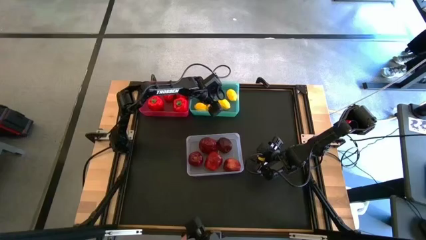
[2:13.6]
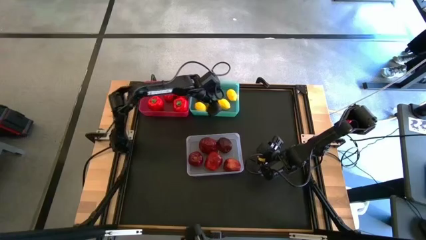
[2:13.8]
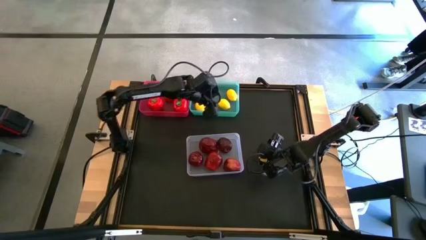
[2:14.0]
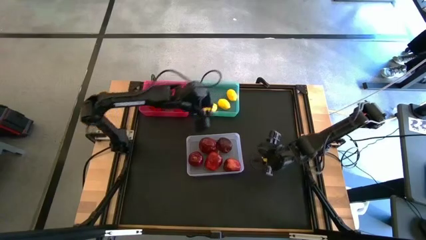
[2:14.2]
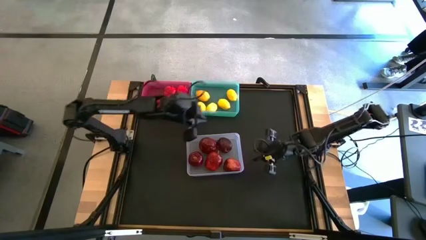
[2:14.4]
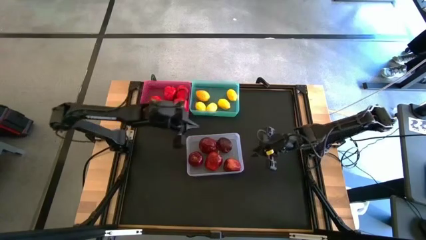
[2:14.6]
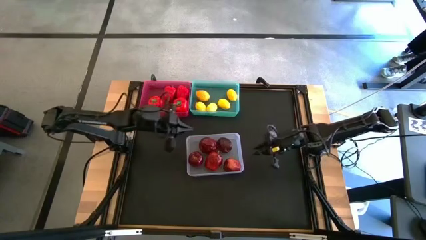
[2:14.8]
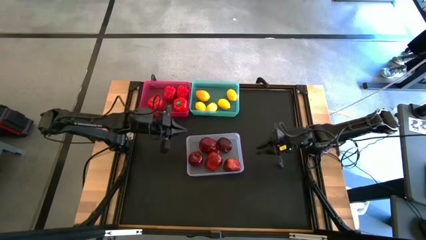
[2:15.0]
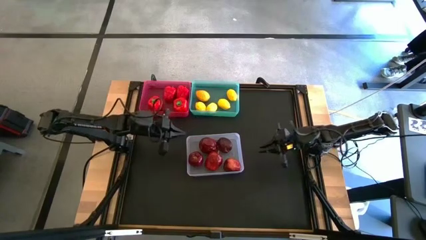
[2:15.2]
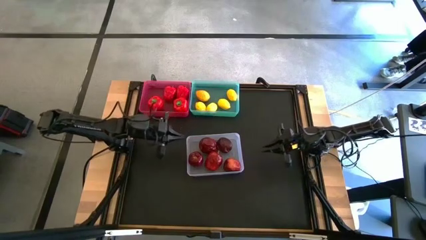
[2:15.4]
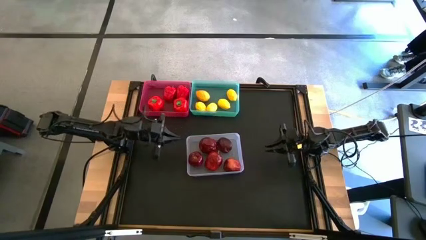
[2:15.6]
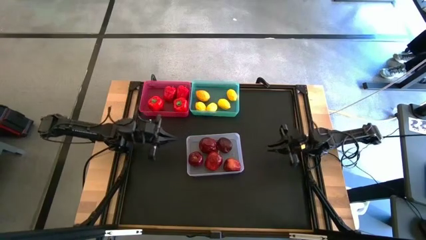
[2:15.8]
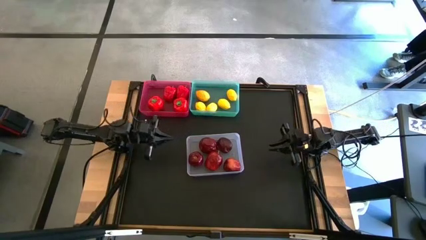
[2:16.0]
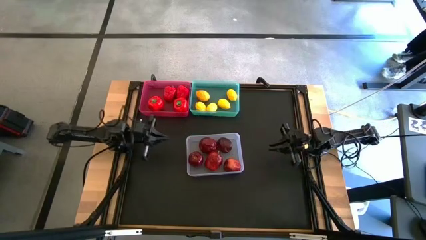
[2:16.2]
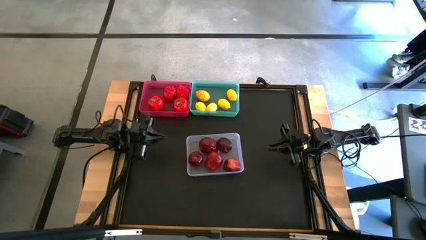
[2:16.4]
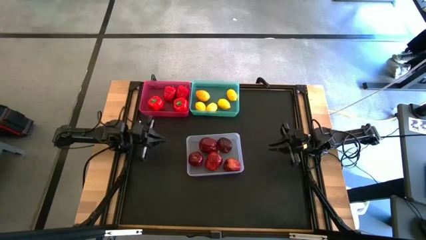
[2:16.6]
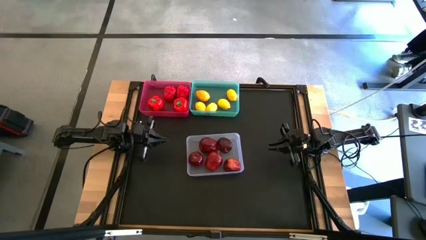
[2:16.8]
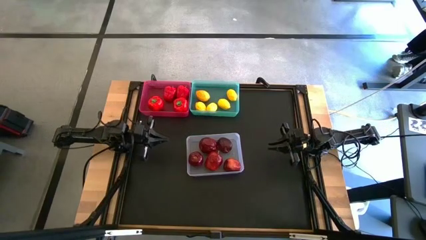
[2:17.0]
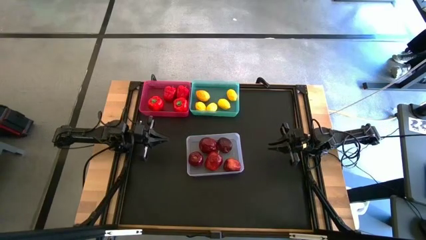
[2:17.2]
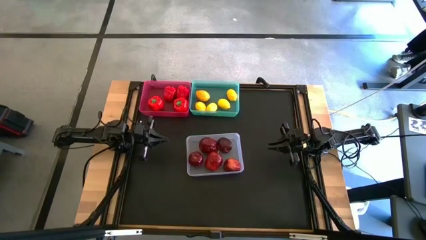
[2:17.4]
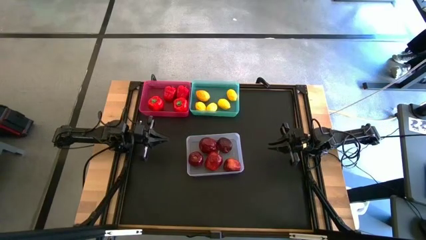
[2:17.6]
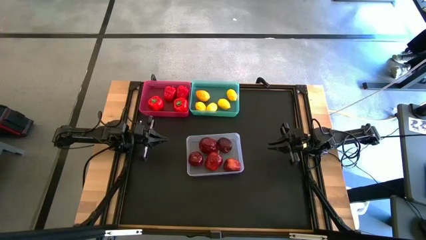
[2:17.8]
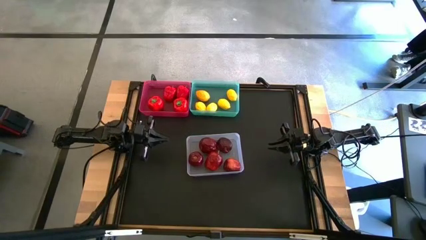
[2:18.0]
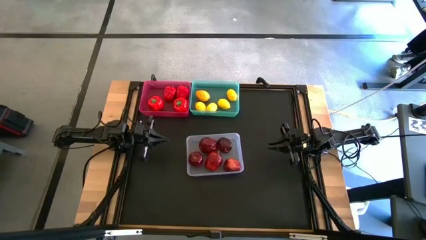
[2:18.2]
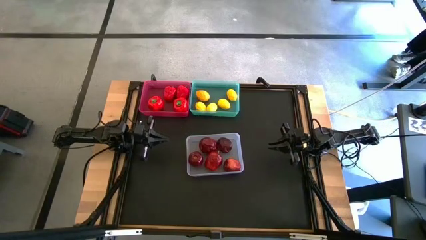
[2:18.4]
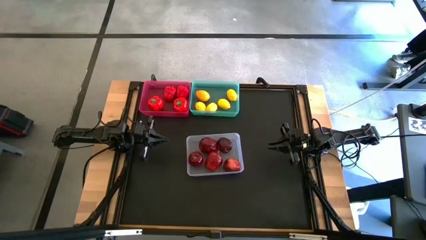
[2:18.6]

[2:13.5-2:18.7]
Task: Sort produce into baskets
Return to Home Position

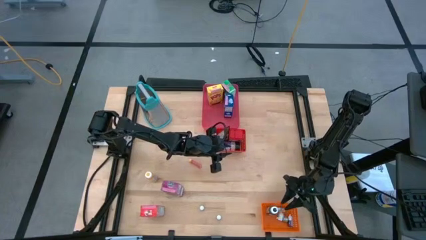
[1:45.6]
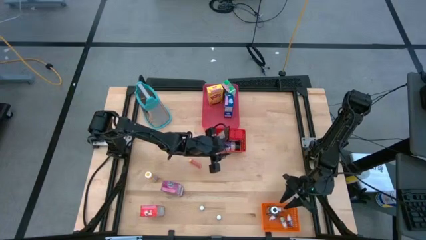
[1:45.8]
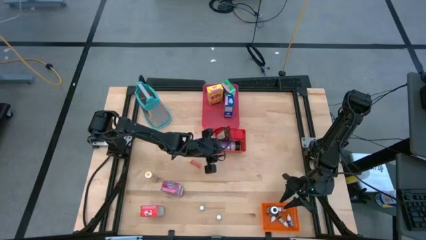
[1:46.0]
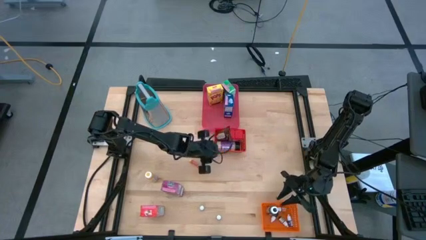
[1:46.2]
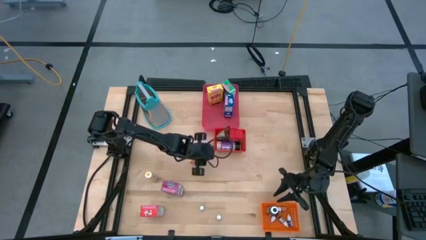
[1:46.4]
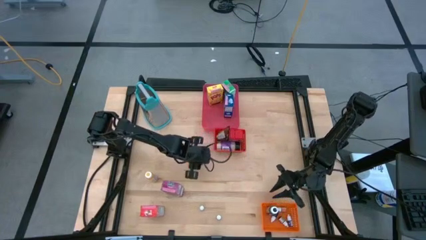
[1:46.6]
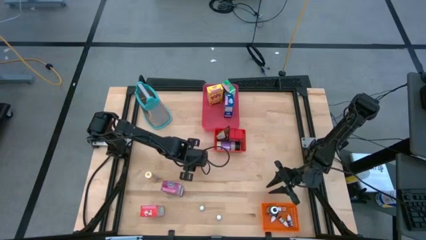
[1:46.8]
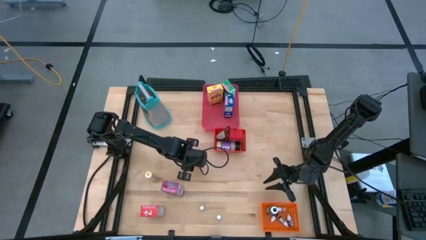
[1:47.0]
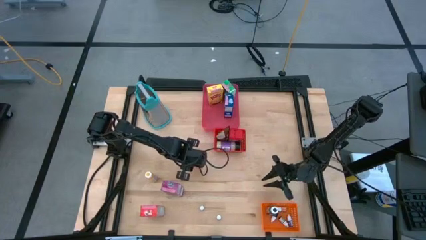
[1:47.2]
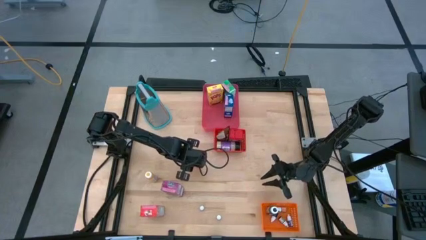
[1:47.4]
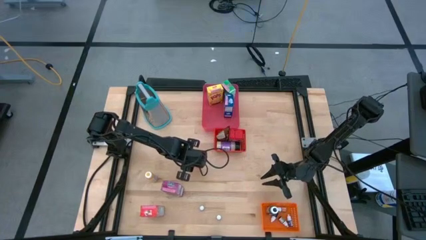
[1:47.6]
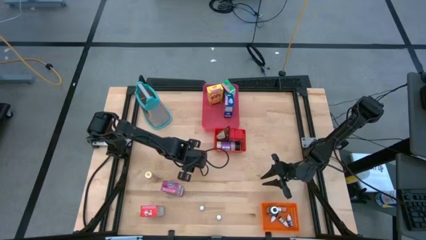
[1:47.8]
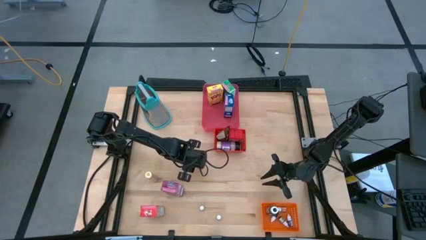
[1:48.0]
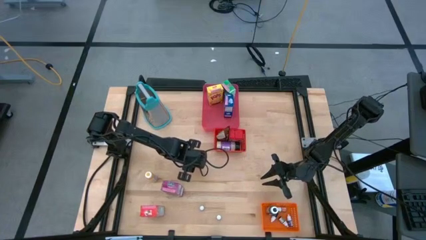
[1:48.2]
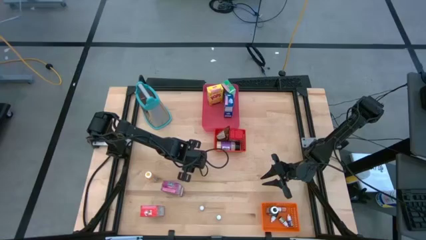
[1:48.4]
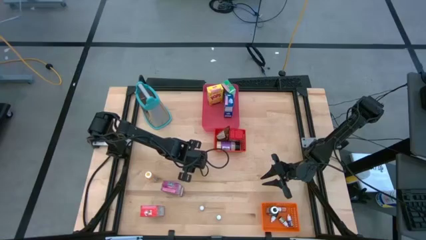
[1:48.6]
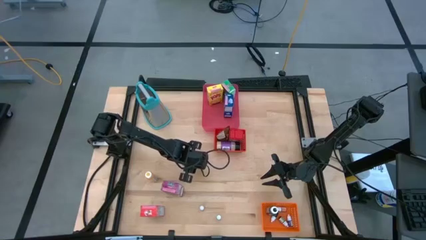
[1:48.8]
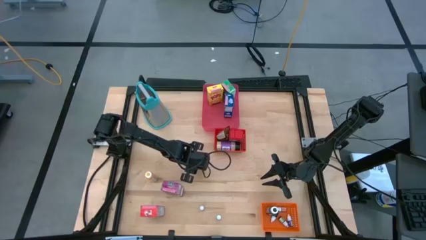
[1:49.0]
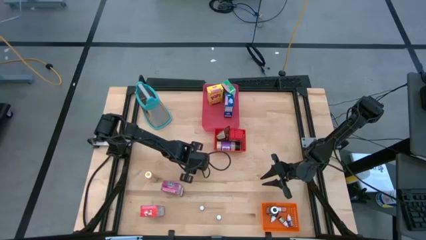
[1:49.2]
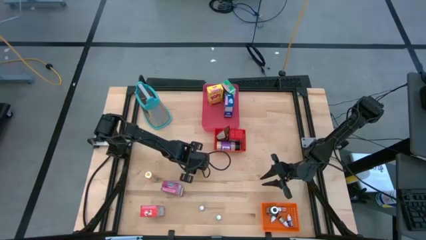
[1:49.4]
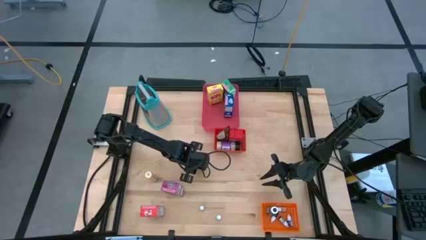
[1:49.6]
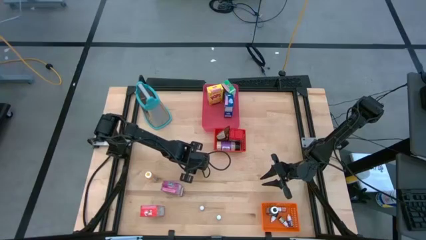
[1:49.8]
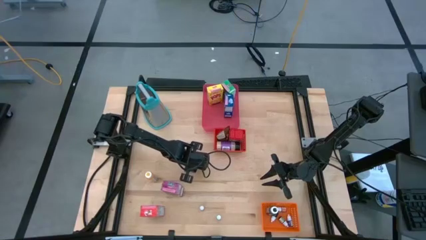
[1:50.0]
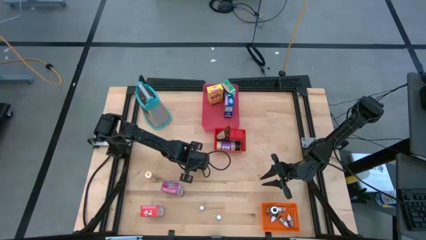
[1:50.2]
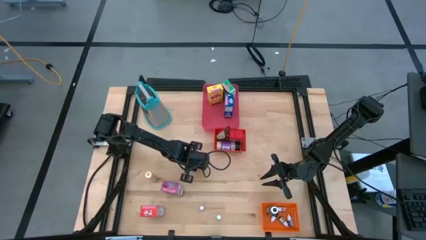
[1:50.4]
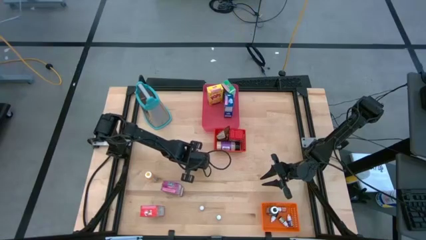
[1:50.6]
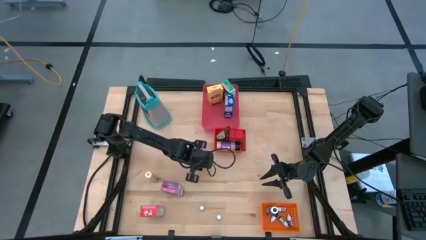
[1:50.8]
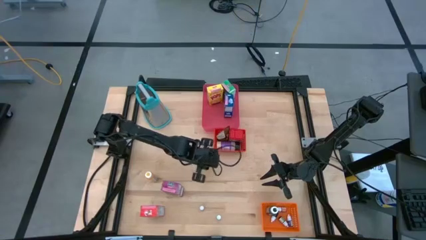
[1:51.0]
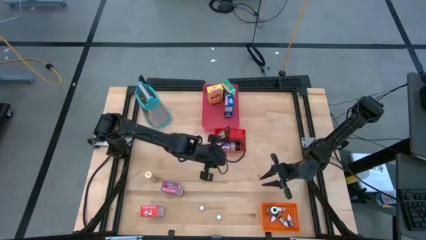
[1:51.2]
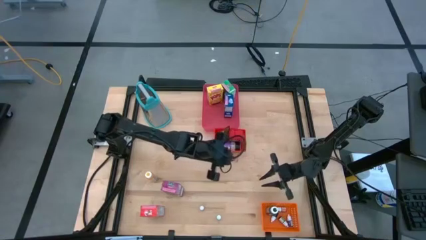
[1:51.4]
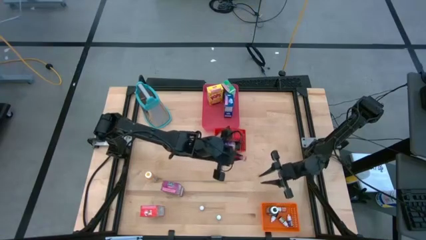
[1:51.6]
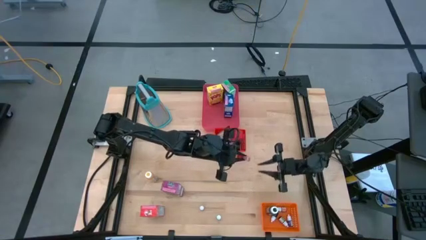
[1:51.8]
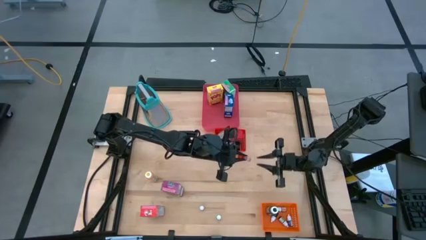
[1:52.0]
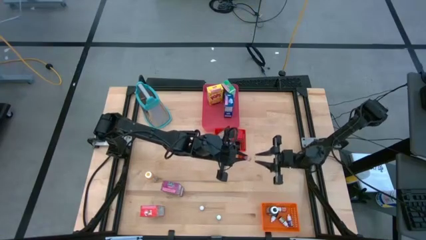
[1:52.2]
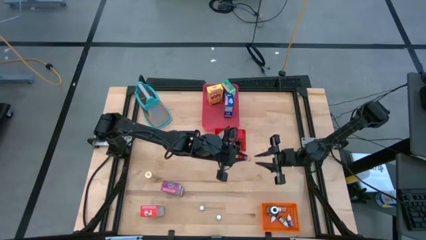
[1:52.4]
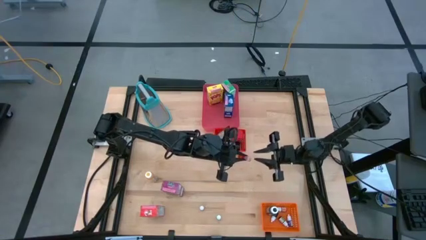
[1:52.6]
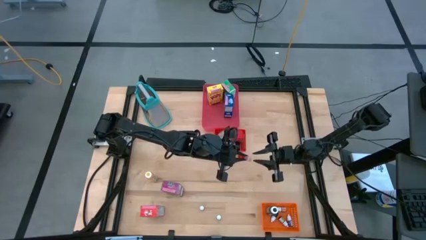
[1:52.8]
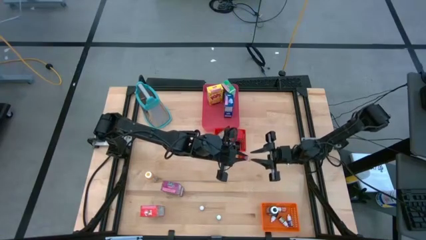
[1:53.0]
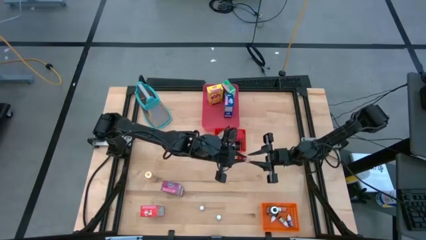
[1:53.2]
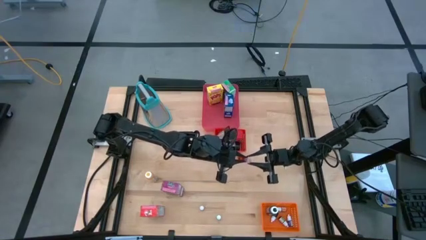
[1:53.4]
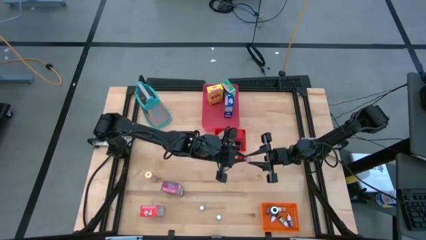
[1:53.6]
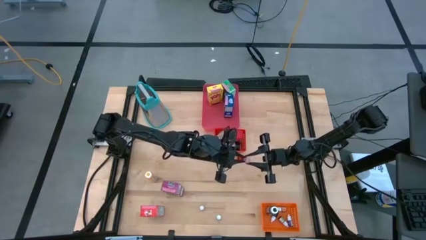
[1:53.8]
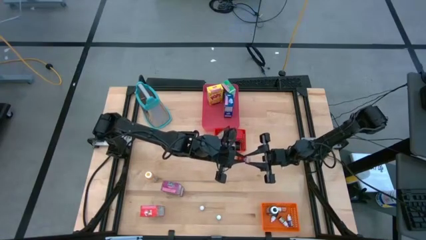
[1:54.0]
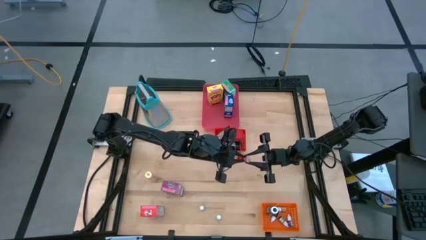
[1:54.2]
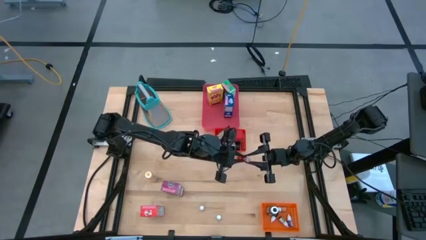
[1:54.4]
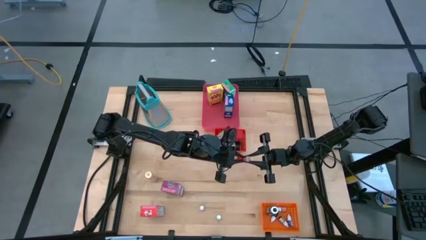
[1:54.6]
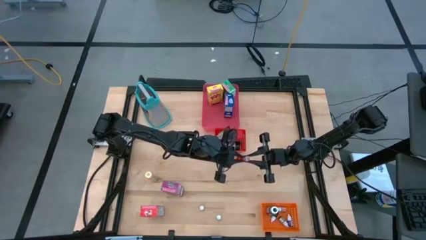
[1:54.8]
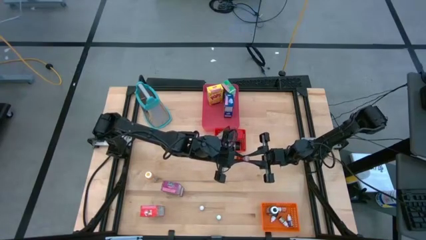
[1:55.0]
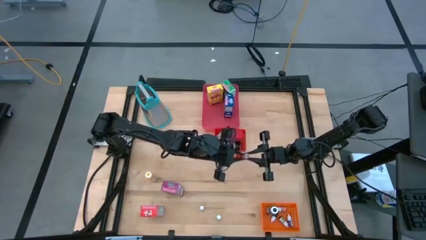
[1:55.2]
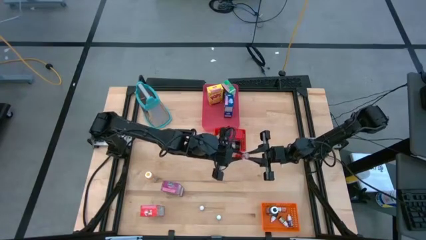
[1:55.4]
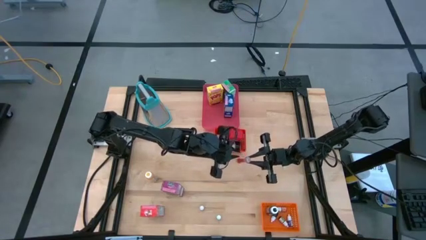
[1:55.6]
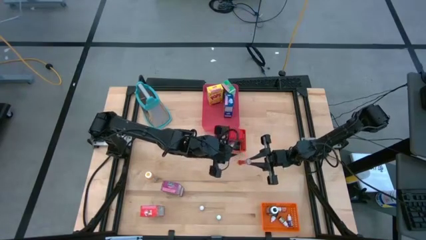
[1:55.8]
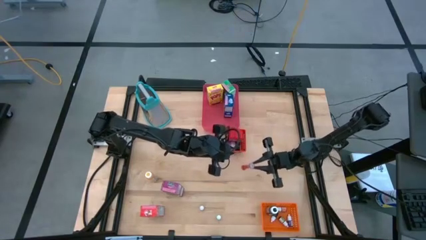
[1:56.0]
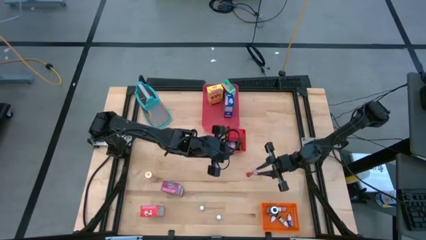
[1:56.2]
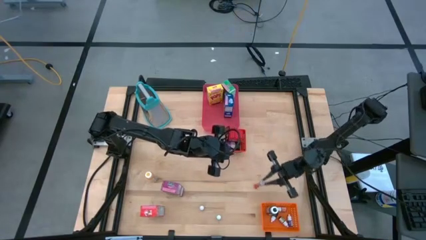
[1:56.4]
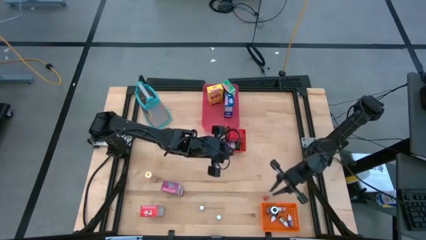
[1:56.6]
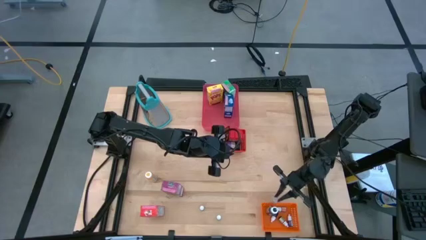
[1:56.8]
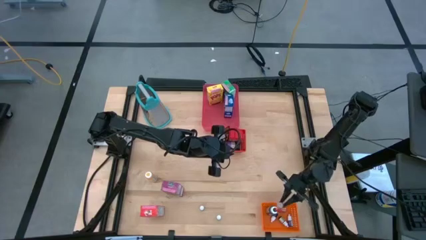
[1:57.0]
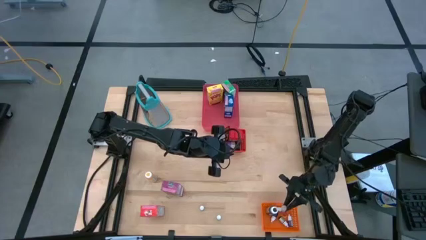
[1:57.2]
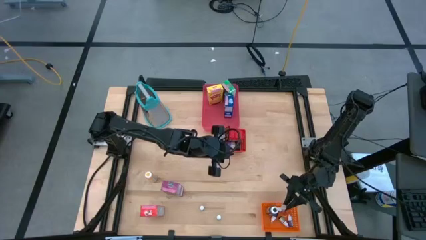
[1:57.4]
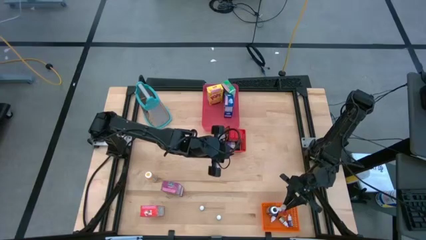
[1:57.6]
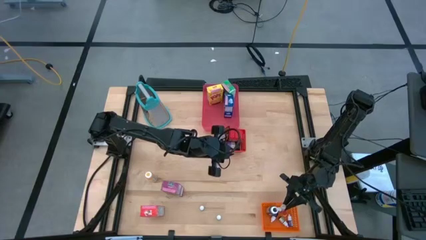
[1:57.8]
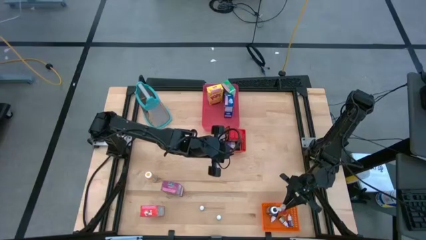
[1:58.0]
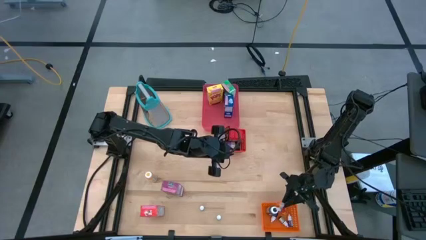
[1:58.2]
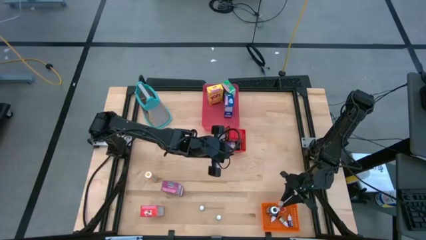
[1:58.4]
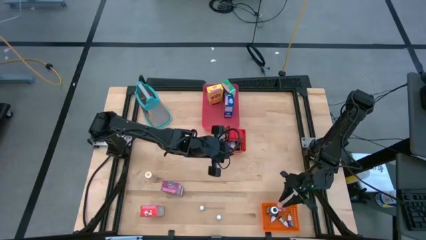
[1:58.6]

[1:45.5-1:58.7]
Task: Pick & Place Kitchen Items
Put the orange food coloring bottle into the orange bin
